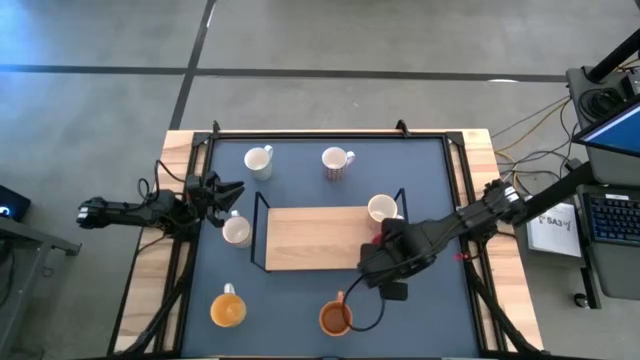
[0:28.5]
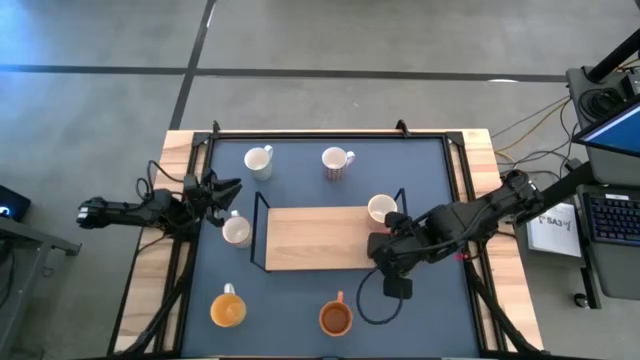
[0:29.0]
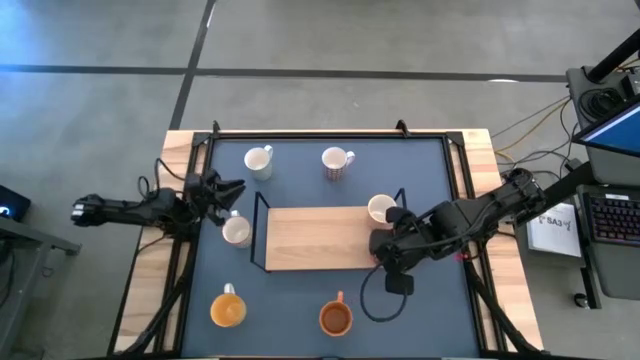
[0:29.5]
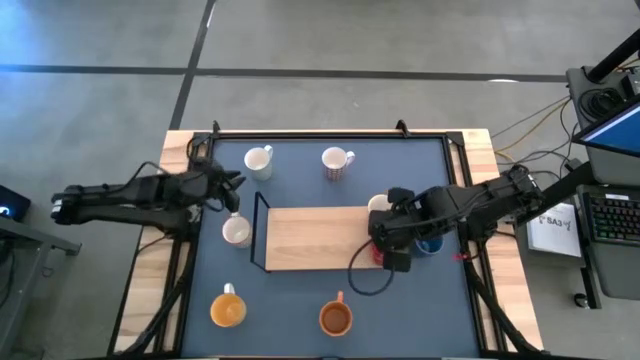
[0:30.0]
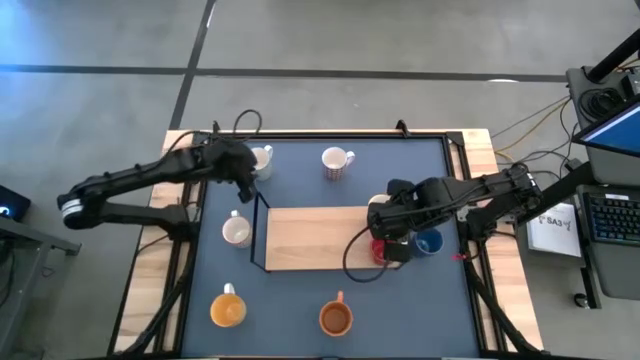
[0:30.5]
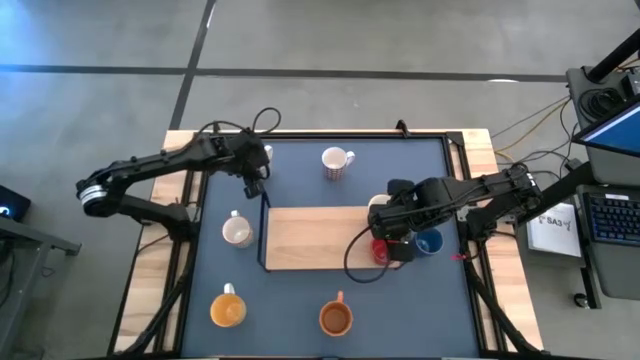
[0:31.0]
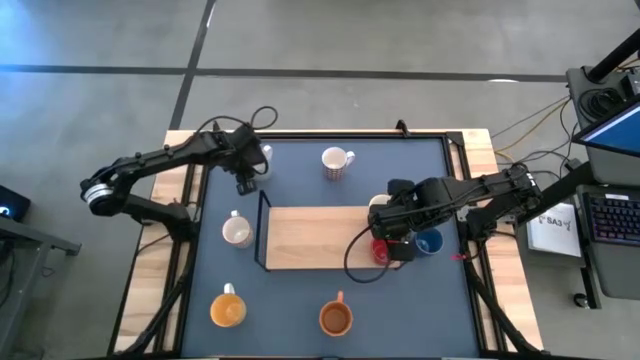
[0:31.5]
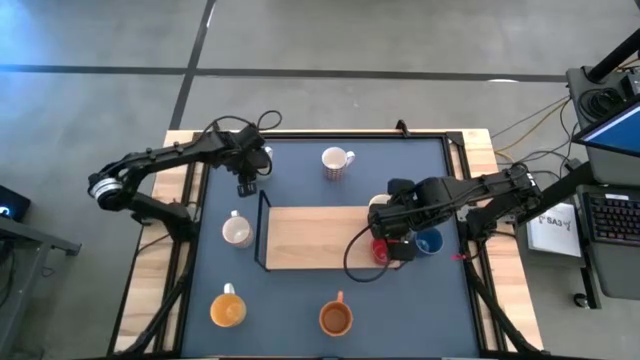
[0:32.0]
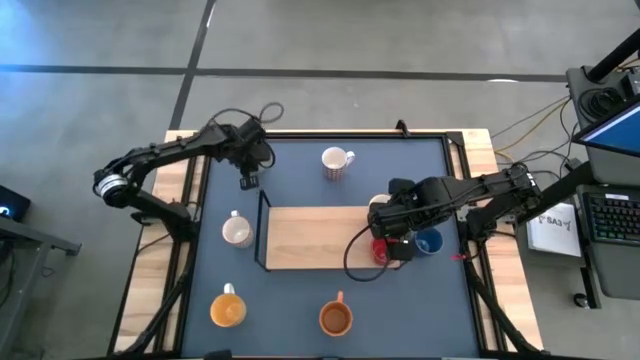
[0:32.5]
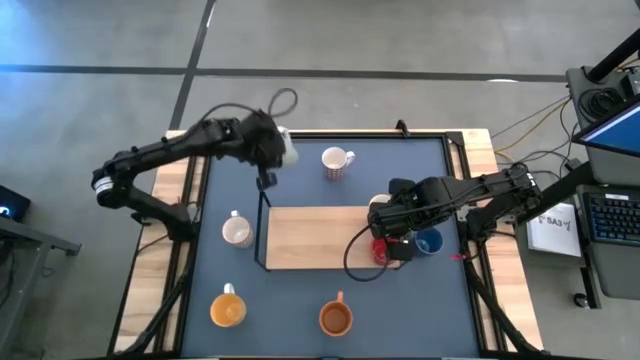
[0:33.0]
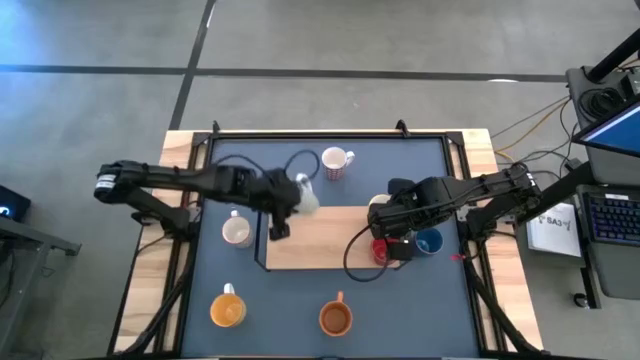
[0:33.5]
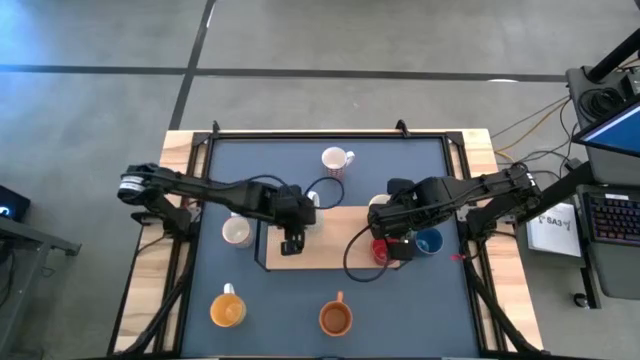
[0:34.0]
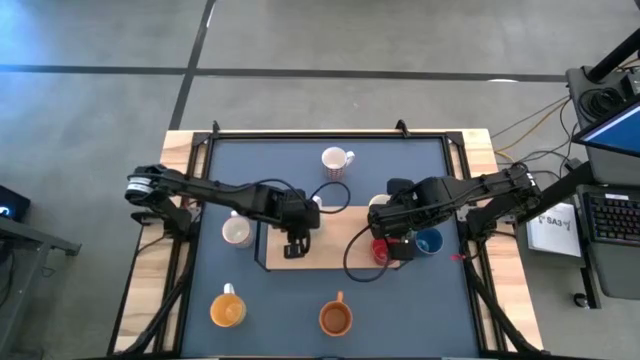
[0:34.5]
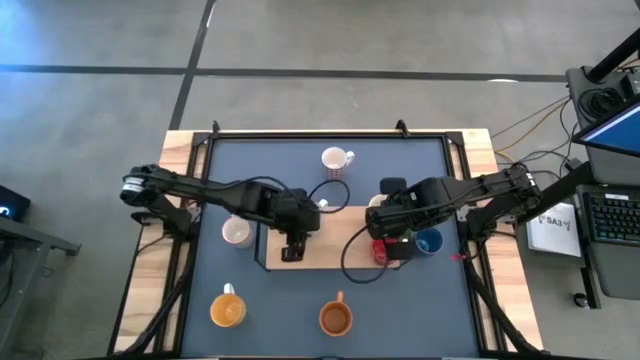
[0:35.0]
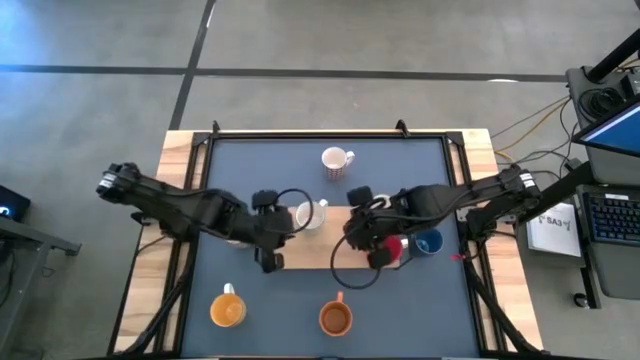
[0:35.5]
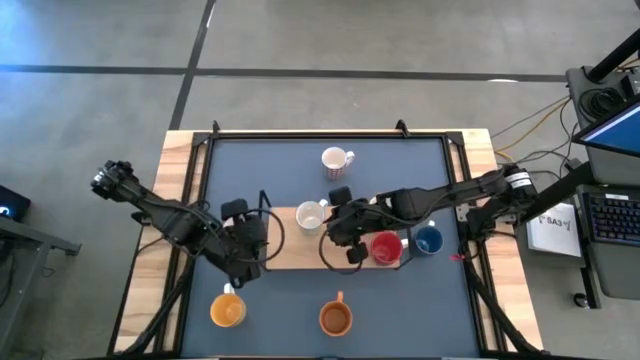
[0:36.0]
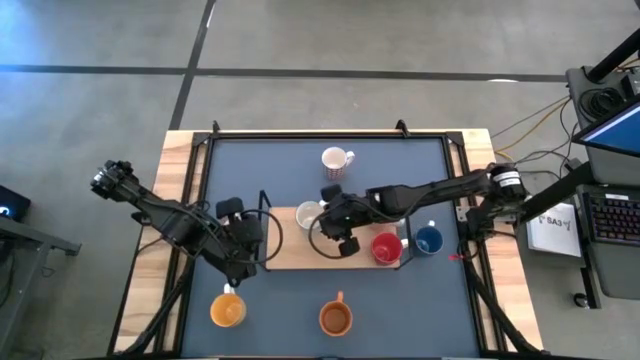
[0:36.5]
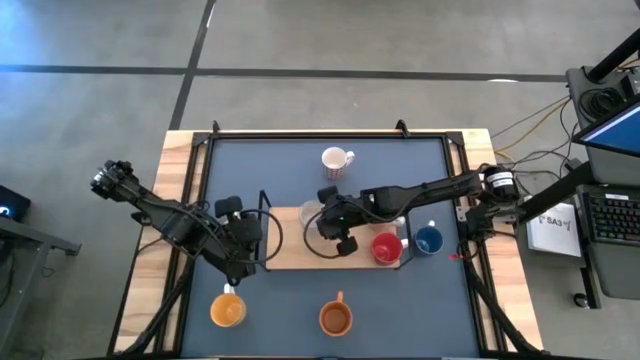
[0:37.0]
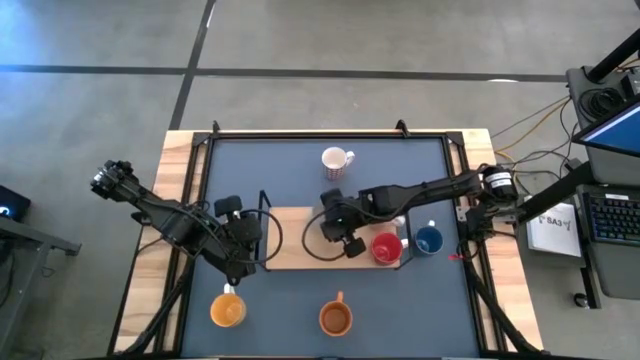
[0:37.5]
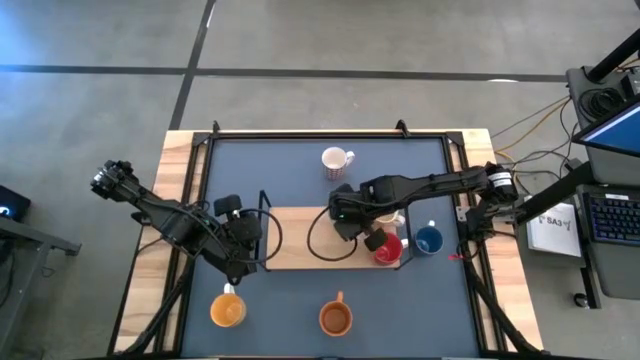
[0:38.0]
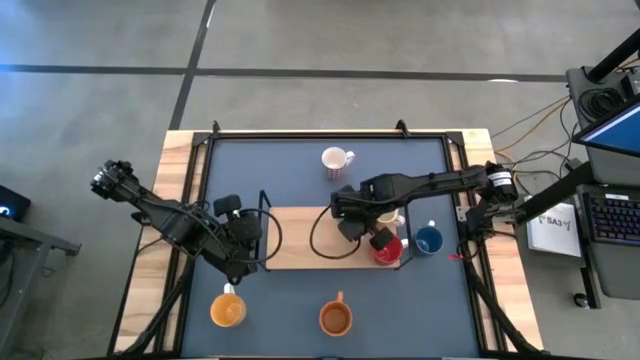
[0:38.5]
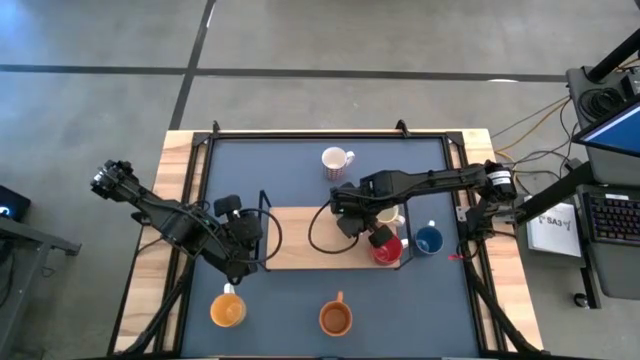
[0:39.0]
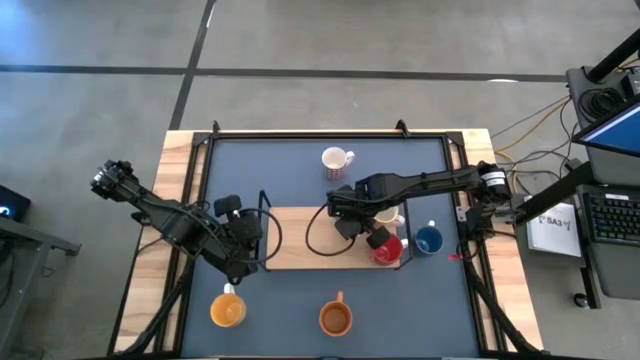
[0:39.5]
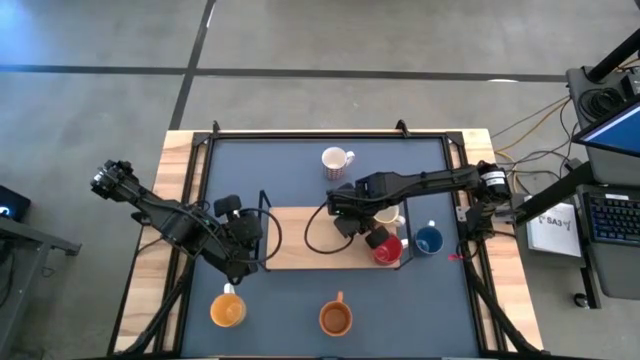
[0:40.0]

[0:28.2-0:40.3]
Task: Place coffee mugs
Put the blue gray patterned mug on the shelf

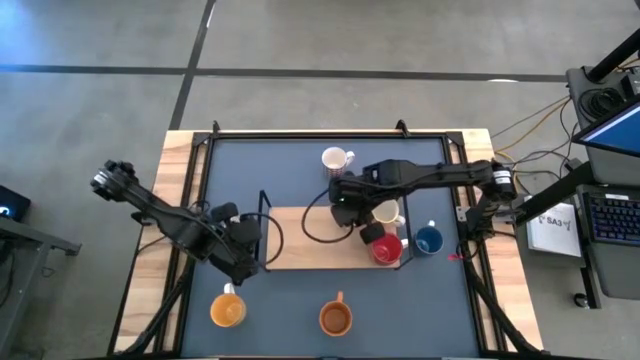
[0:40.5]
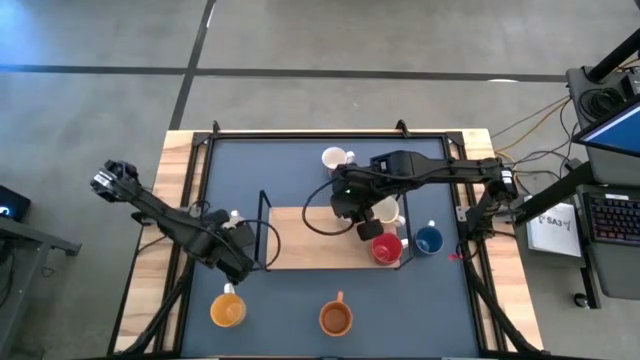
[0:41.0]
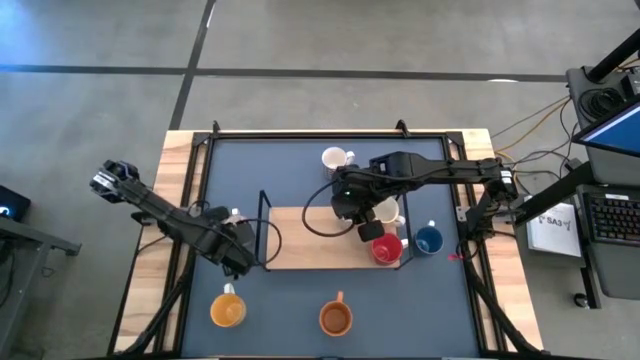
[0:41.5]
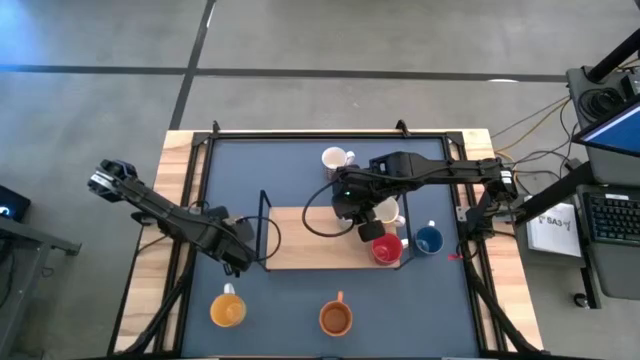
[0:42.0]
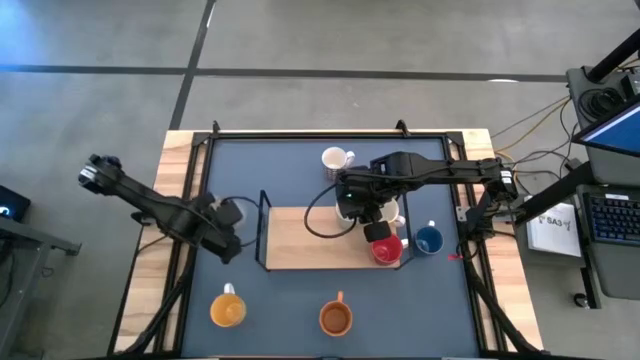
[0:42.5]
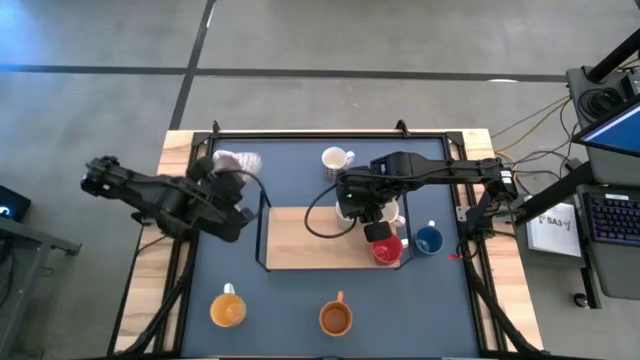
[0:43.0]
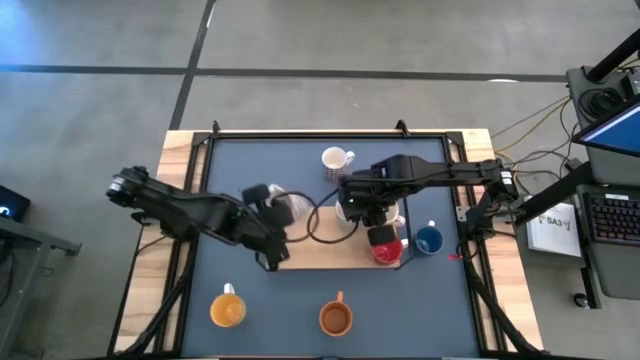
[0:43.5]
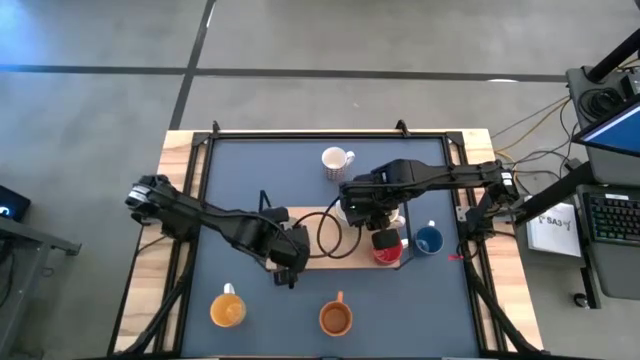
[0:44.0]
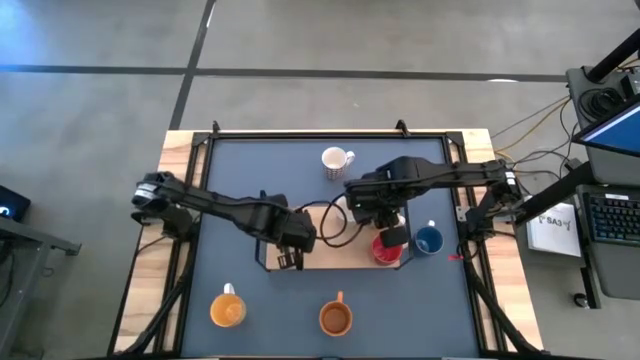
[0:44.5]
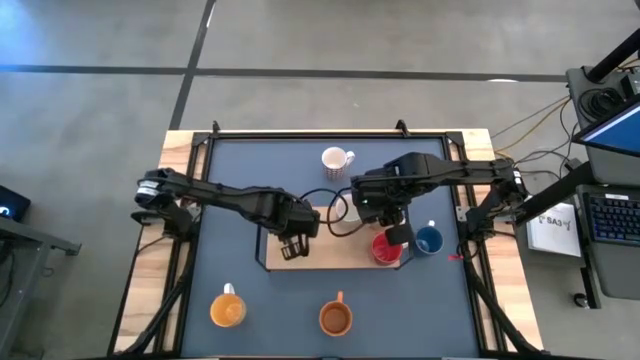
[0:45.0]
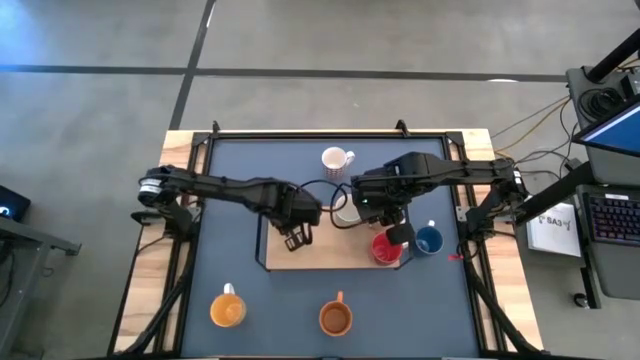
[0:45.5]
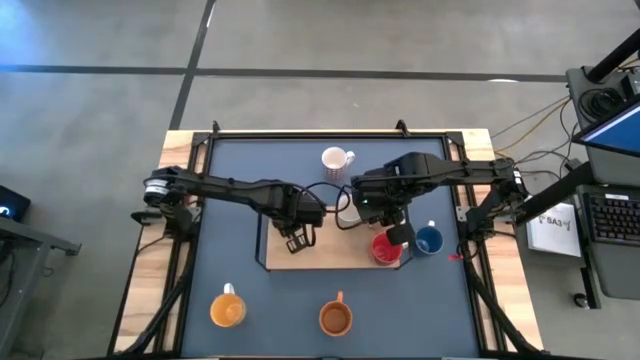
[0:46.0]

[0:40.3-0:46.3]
Put the red gray patterned mug on the shelf

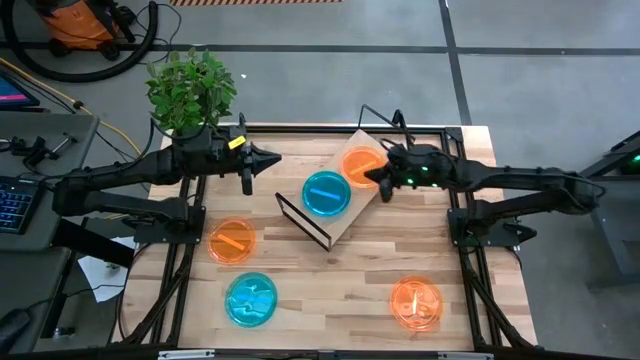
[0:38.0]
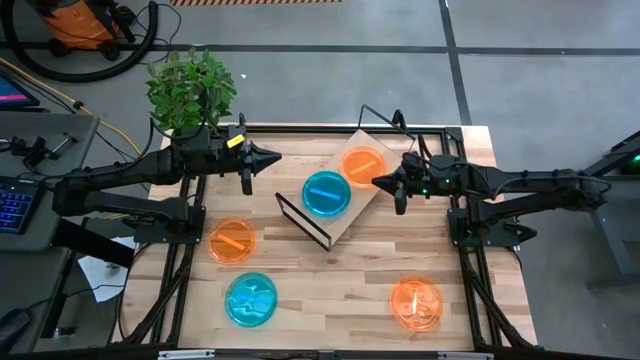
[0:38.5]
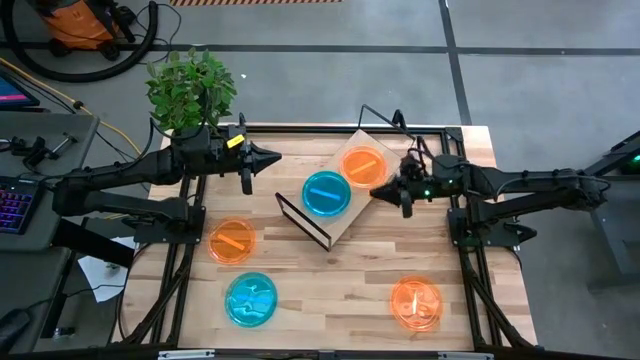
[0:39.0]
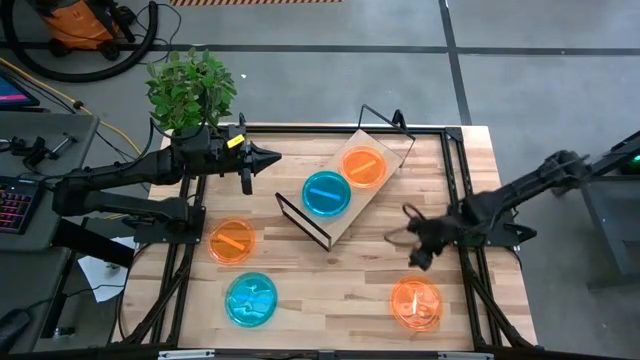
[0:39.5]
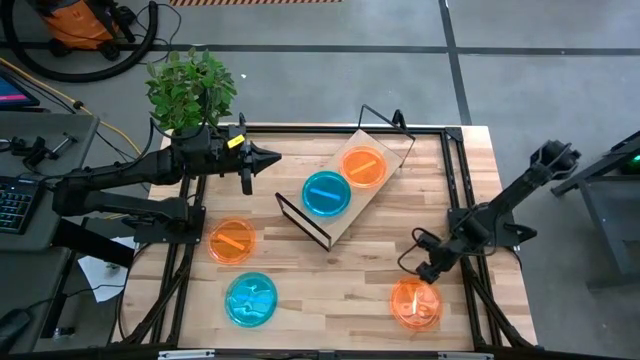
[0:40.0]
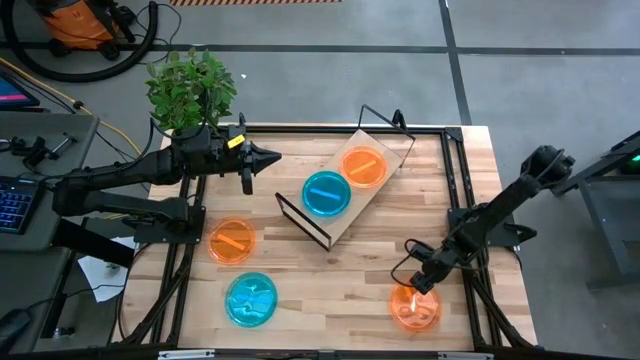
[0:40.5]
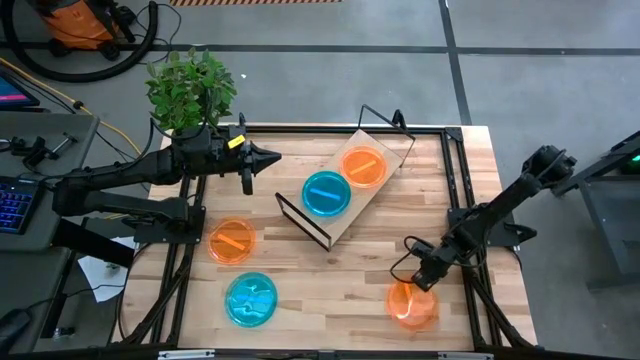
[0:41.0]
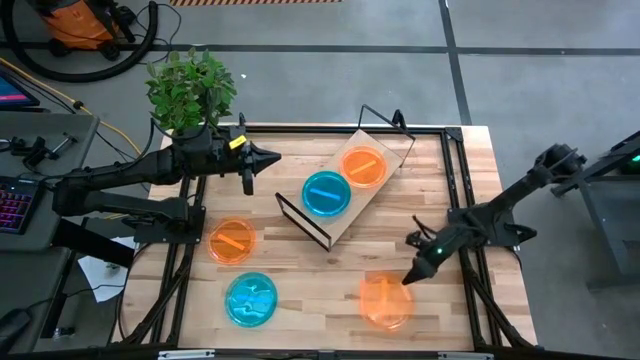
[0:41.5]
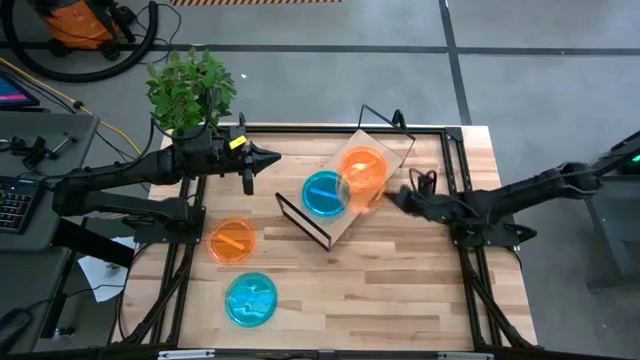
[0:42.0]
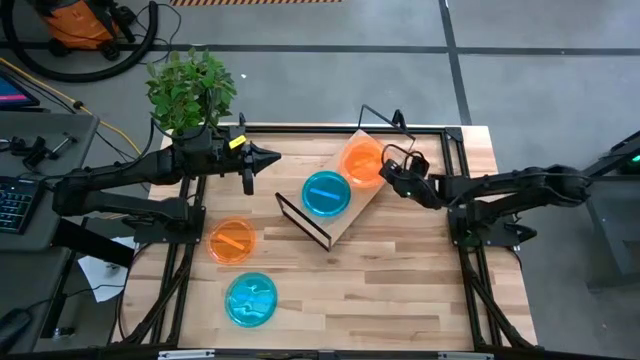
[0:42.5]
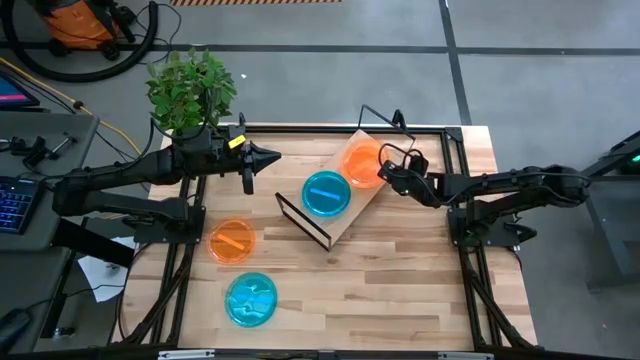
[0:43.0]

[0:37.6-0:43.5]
Task: Place and stack plates onto a shelf
Stack the right orange plate on top of the orange plate on the shelf
